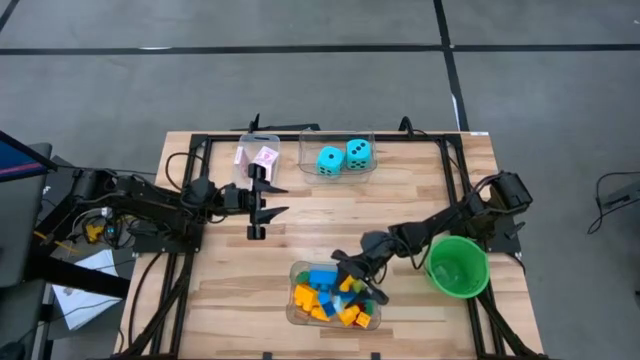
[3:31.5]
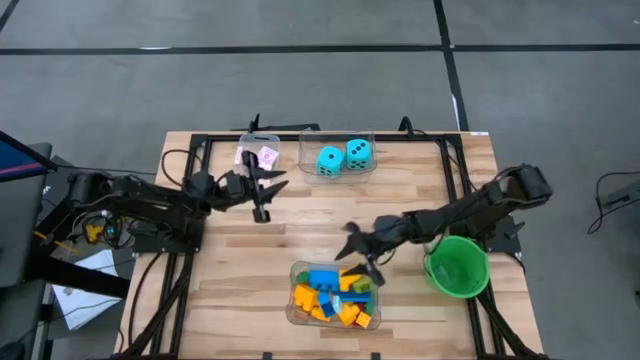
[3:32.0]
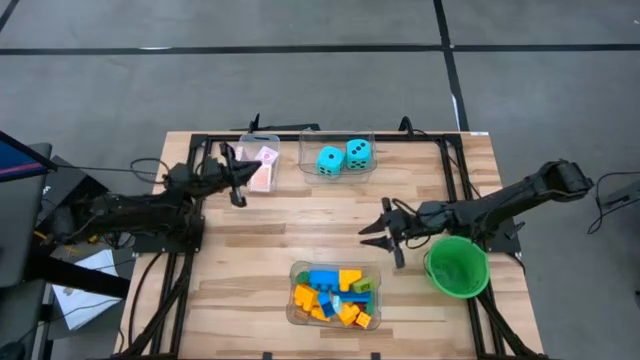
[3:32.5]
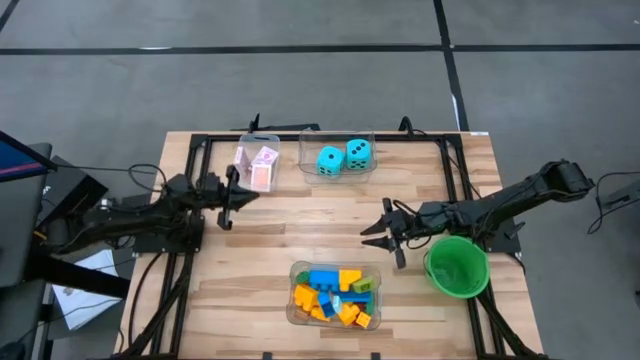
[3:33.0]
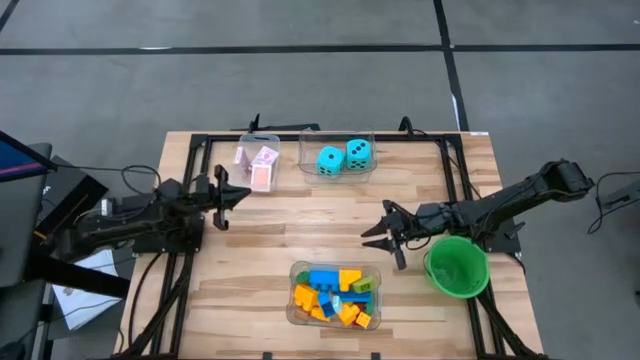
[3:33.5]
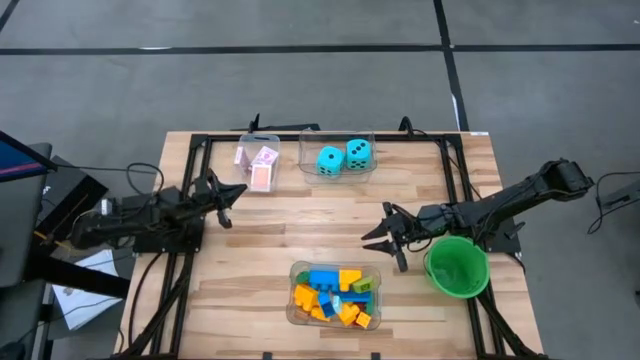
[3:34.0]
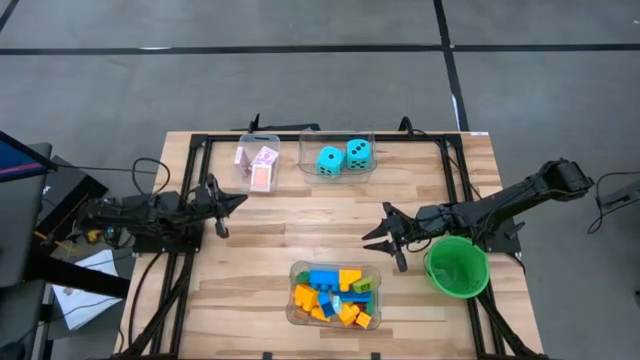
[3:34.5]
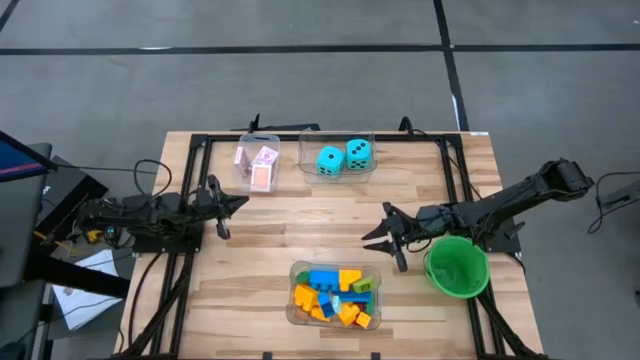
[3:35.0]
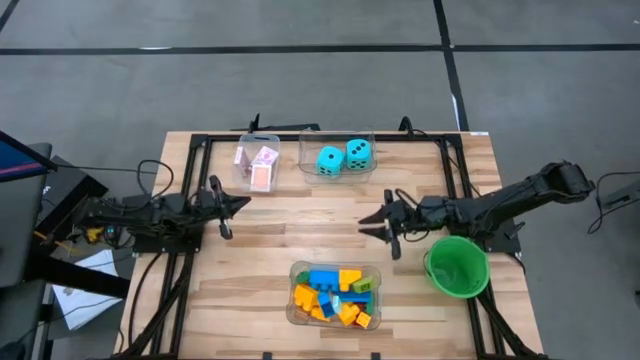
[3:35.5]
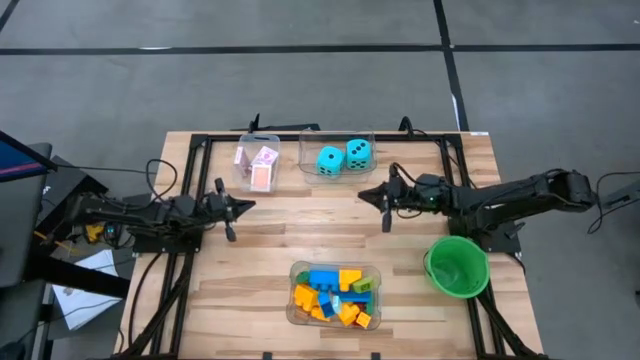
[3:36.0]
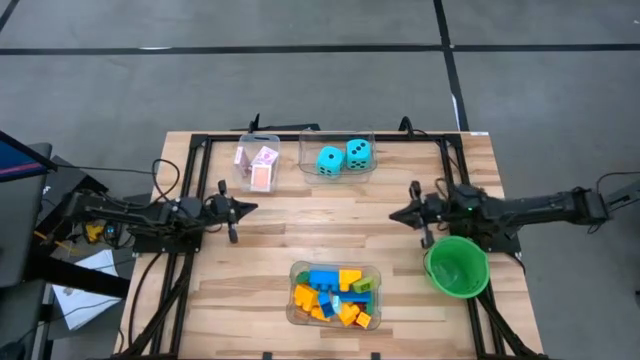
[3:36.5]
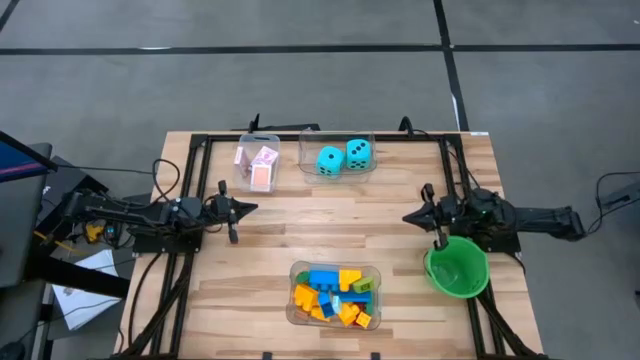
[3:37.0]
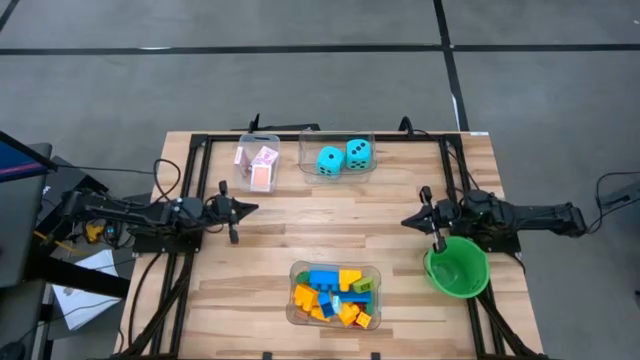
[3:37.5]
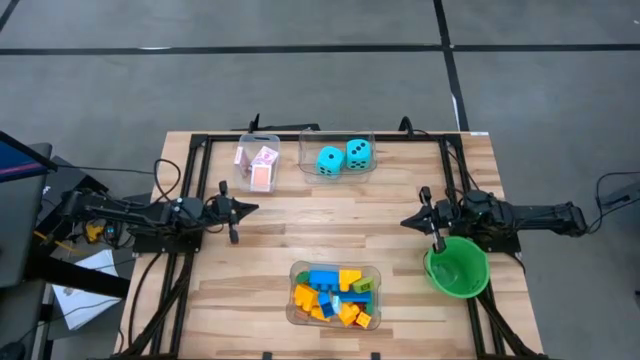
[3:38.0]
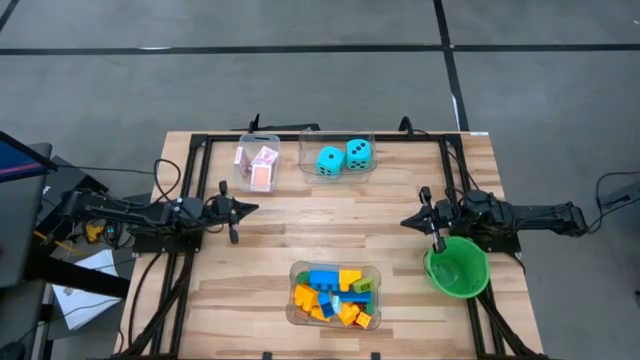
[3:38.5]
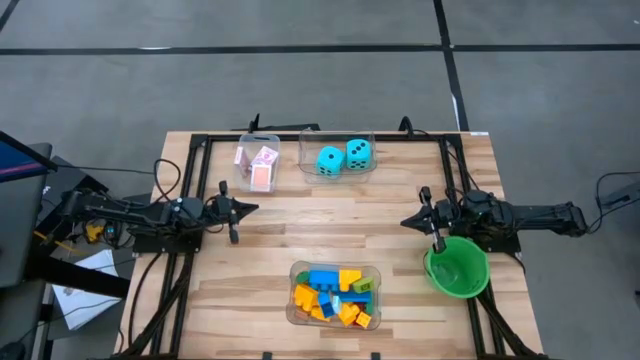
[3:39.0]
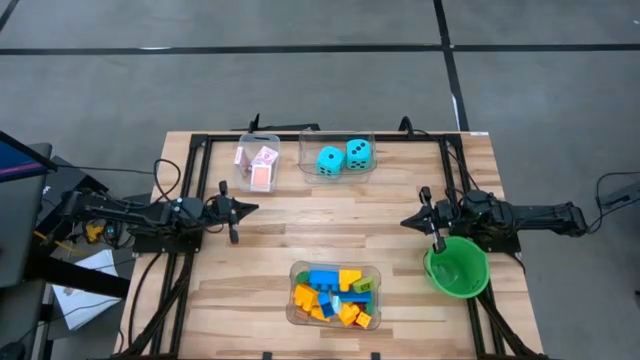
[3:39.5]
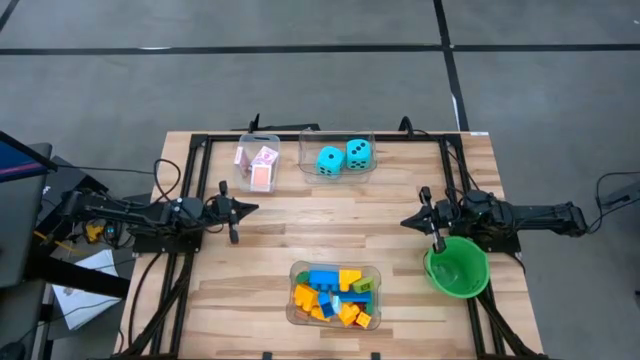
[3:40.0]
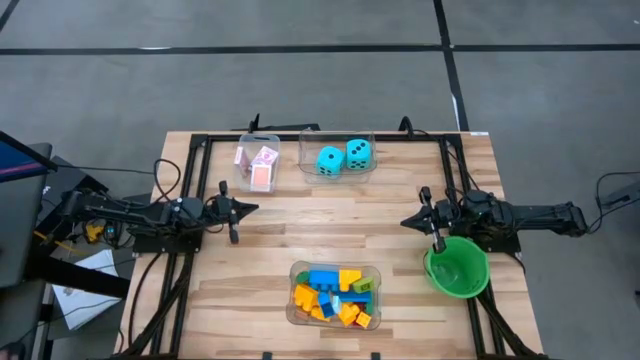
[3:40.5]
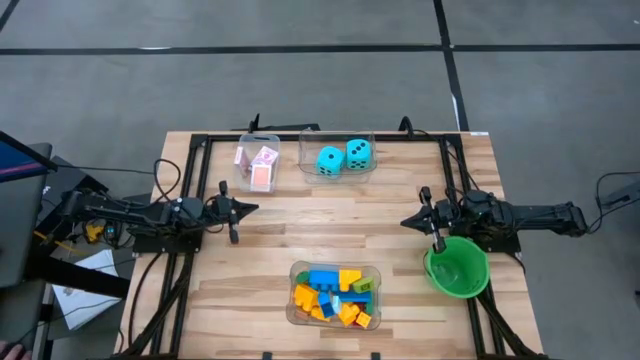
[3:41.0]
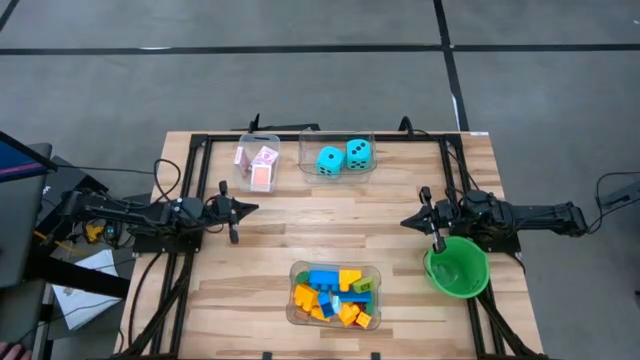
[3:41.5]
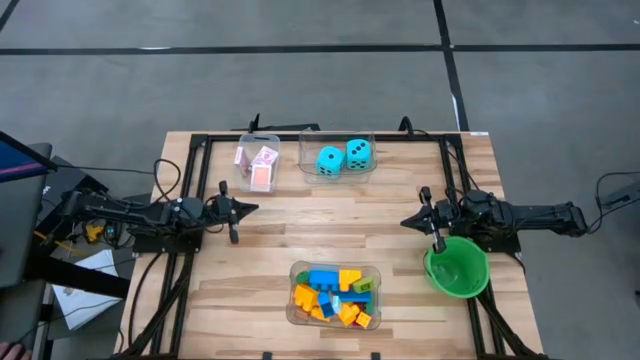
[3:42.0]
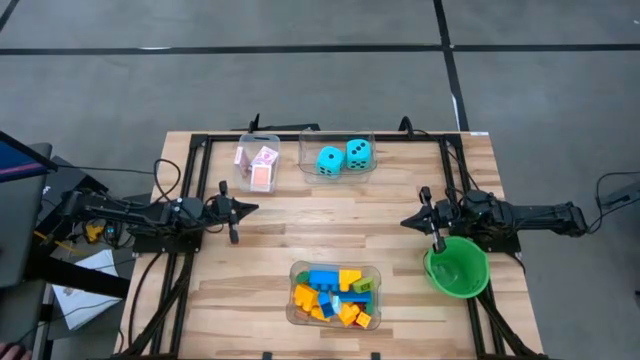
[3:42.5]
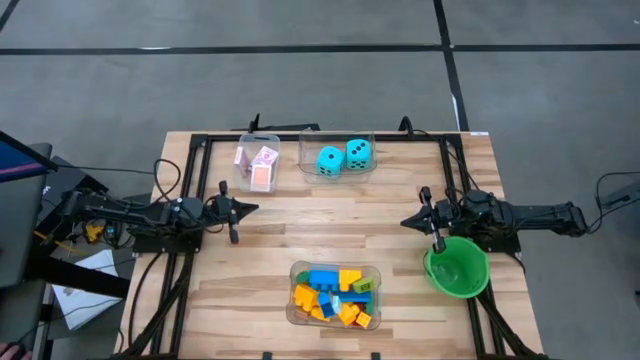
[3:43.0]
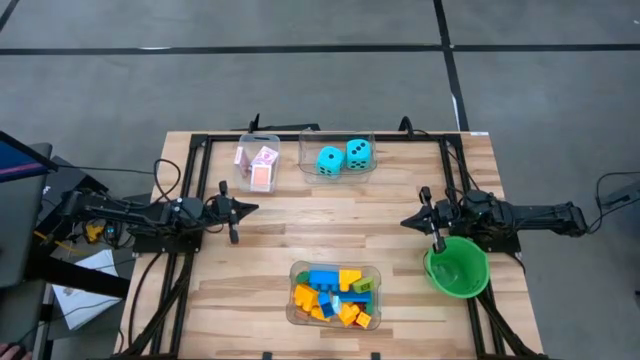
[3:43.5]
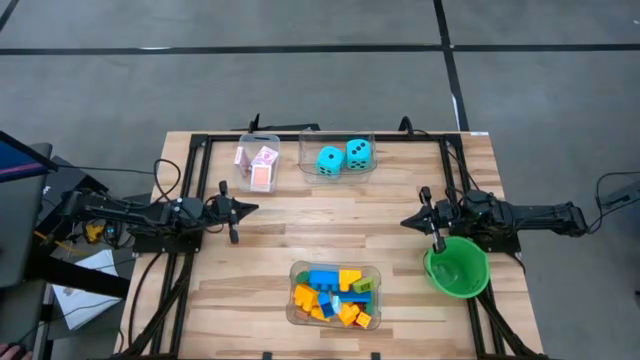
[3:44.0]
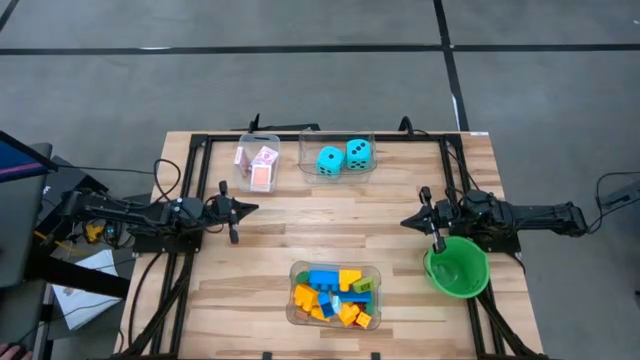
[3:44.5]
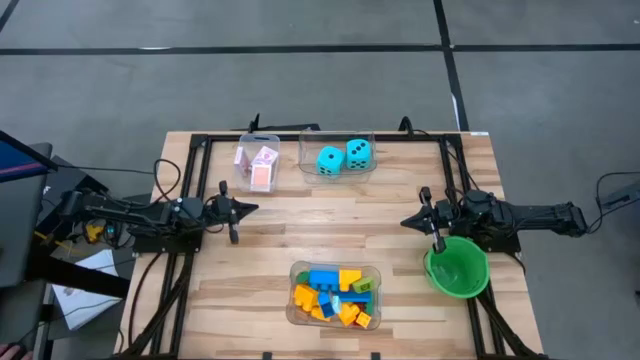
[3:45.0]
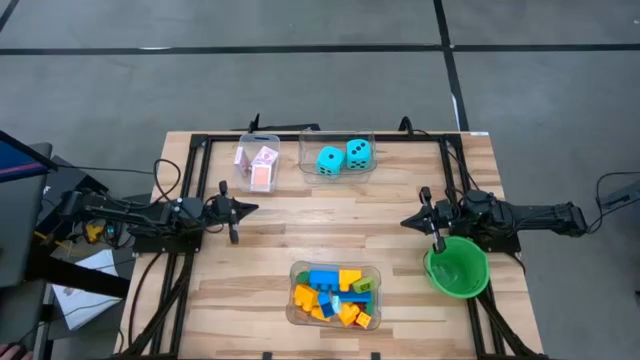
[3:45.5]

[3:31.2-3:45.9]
Task: Pick & Place Toys
Return to Home Position

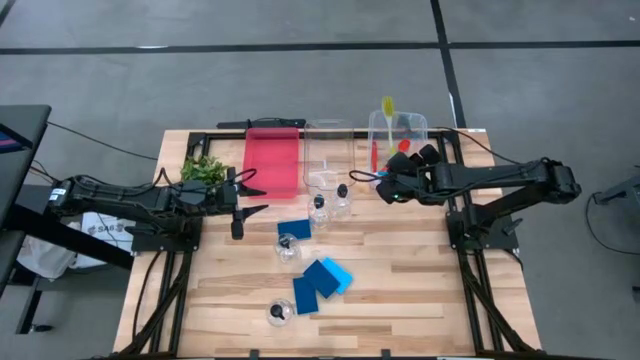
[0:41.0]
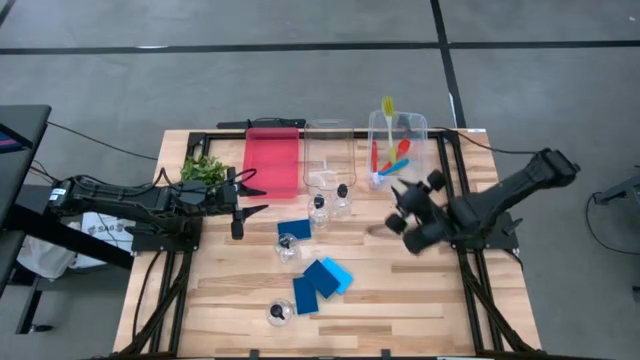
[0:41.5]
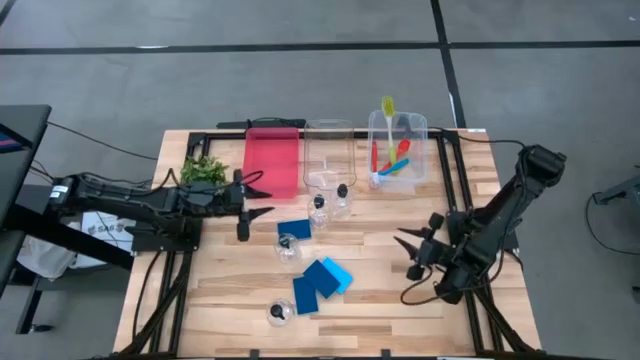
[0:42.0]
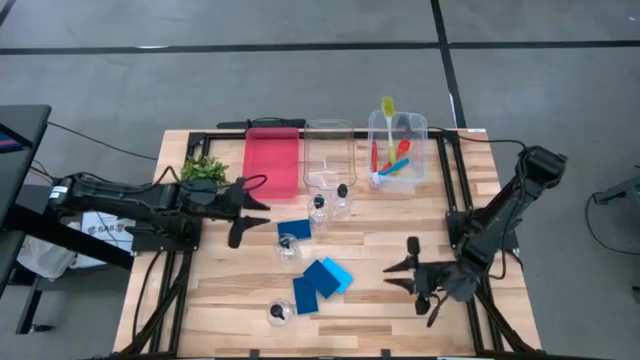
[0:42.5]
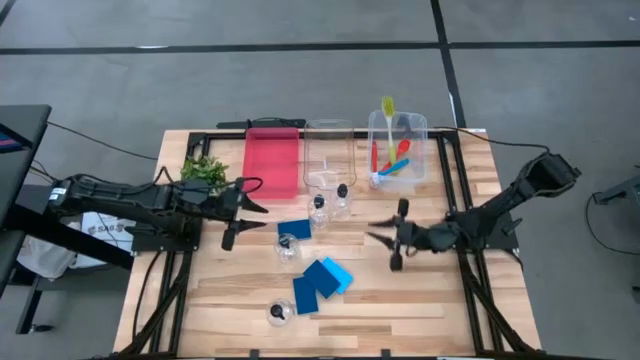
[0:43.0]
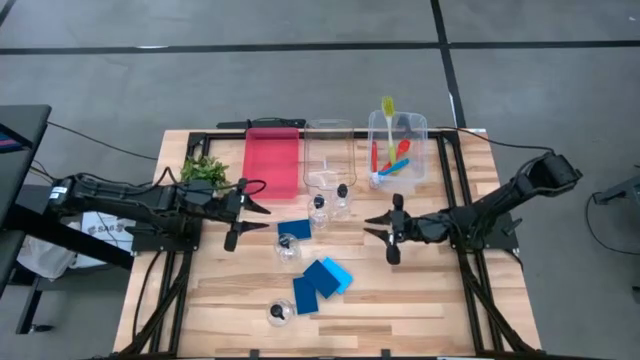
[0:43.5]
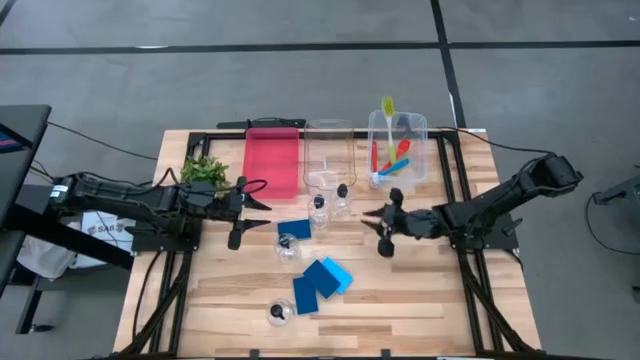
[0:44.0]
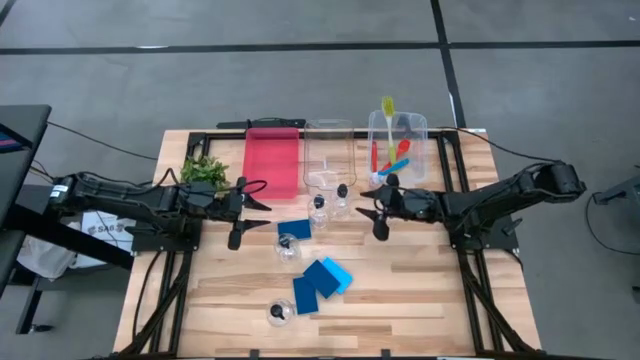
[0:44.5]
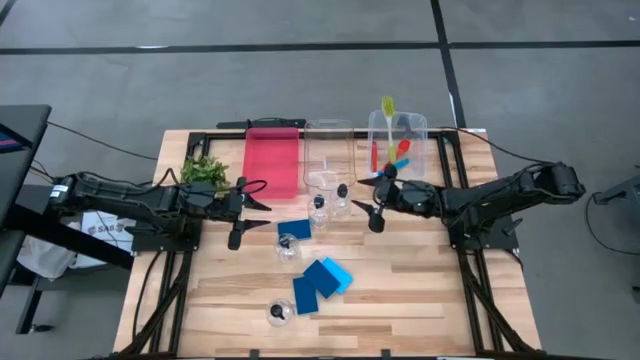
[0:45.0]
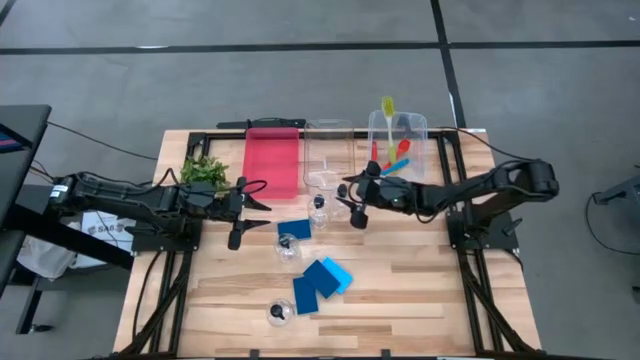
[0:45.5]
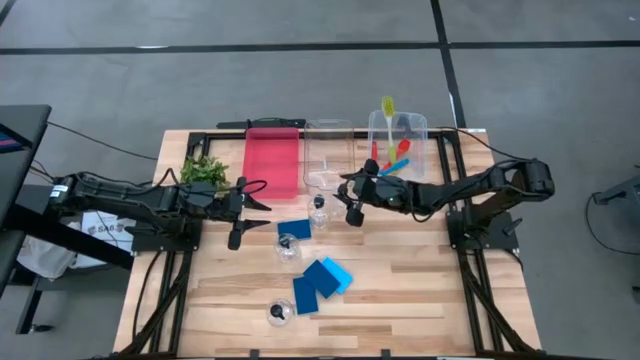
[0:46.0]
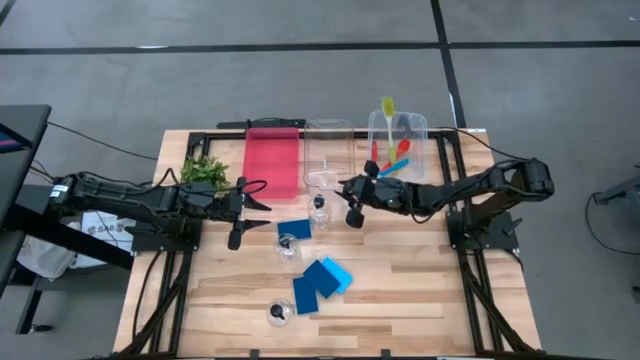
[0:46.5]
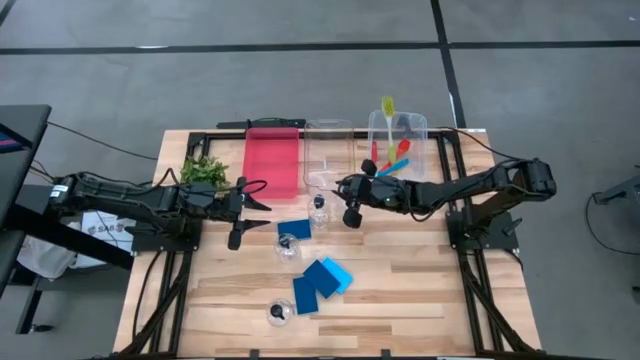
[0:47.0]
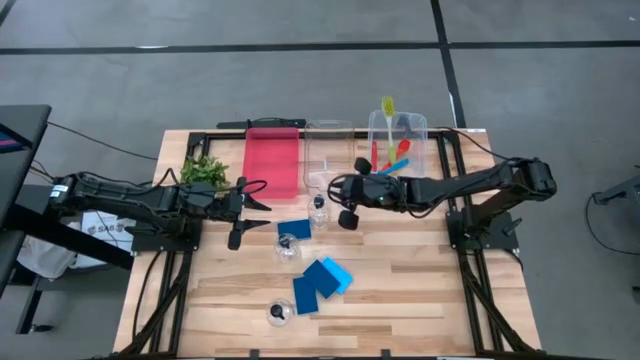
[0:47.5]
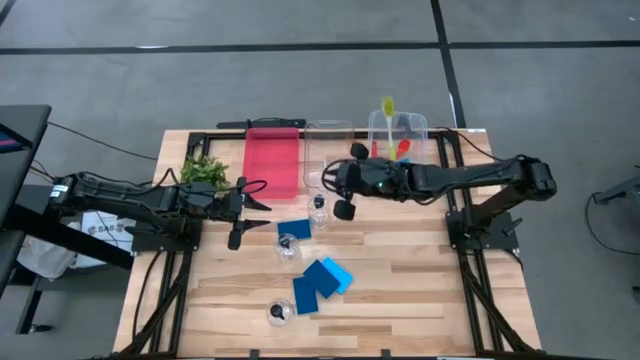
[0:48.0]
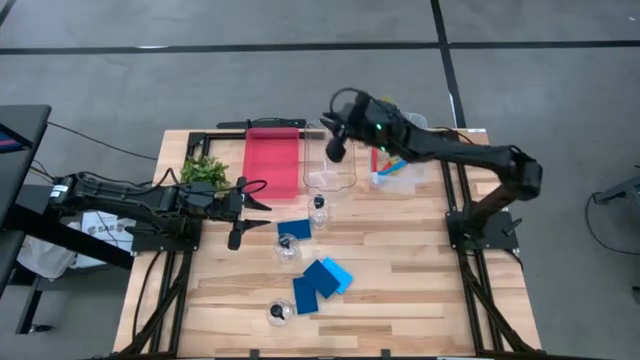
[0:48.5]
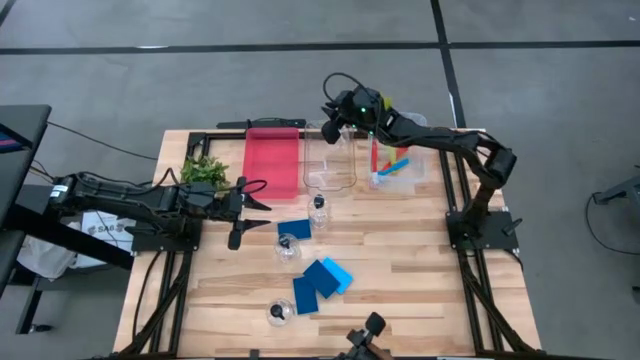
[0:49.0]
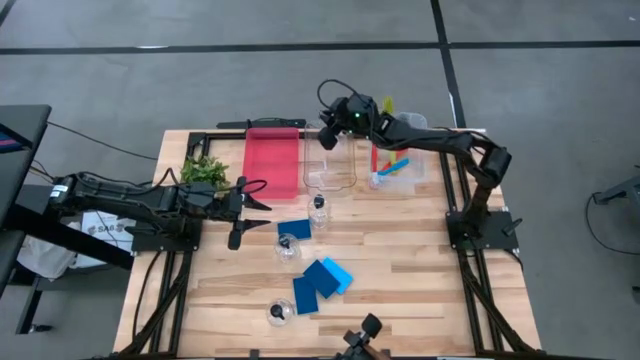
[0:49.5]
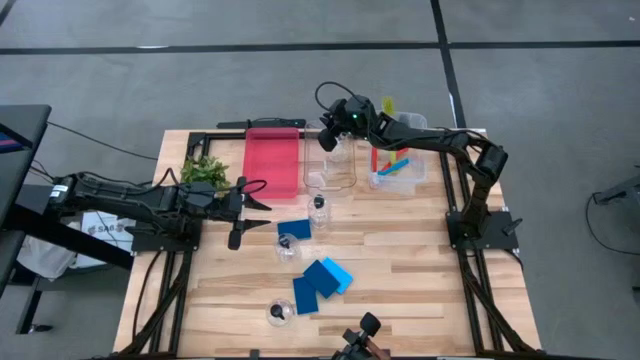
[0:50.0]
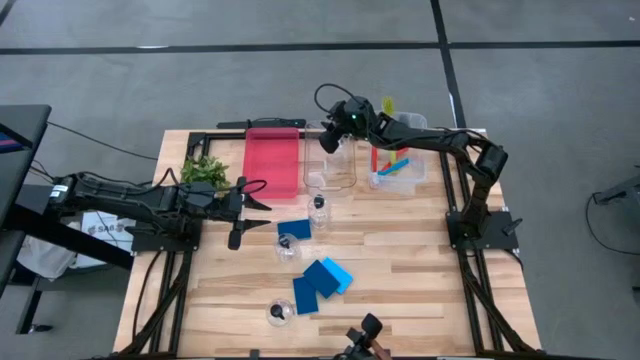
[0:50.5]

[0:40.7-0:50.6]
Task: Pick & Place Kitchen Sink Supplies
Put the soap dispenser into the left transparent bin
